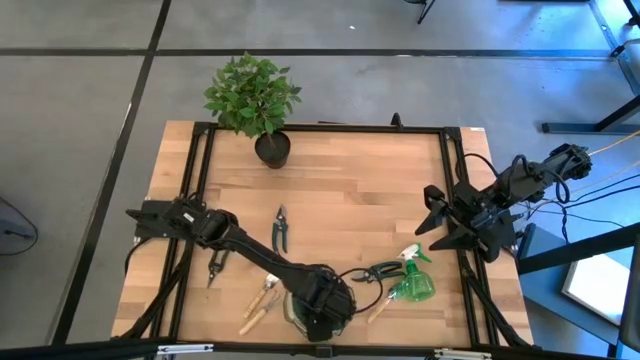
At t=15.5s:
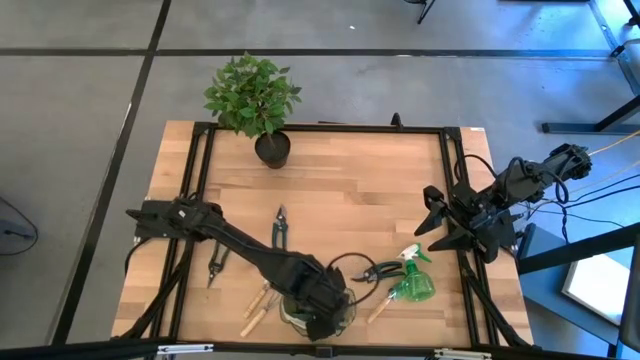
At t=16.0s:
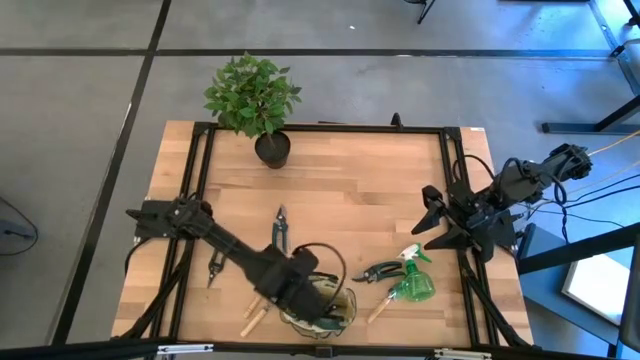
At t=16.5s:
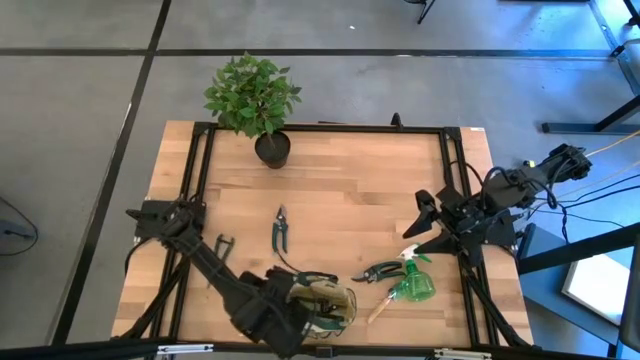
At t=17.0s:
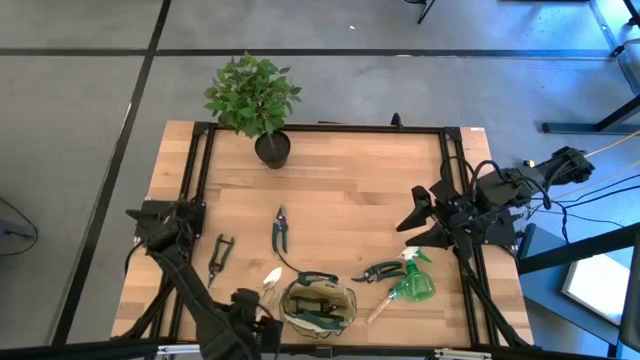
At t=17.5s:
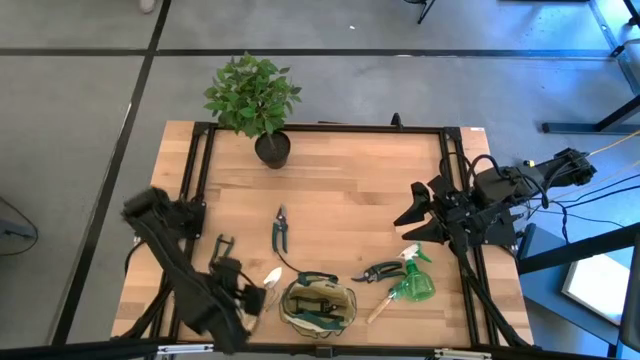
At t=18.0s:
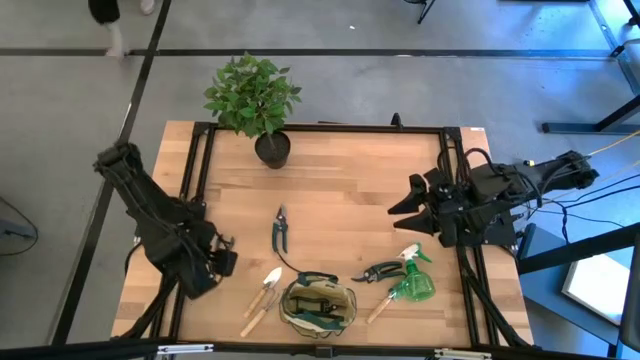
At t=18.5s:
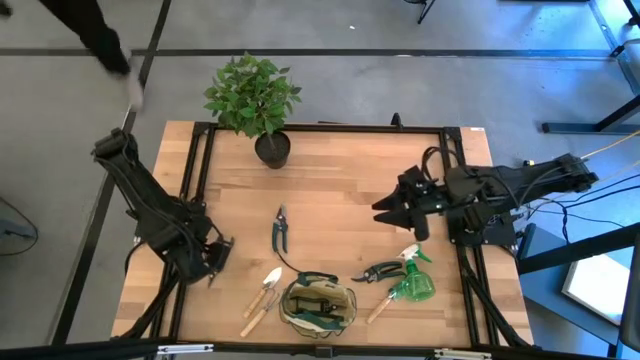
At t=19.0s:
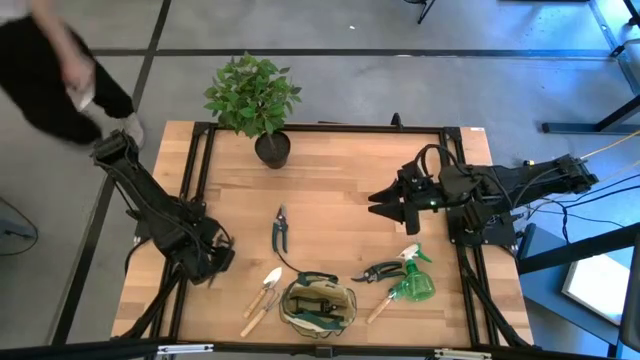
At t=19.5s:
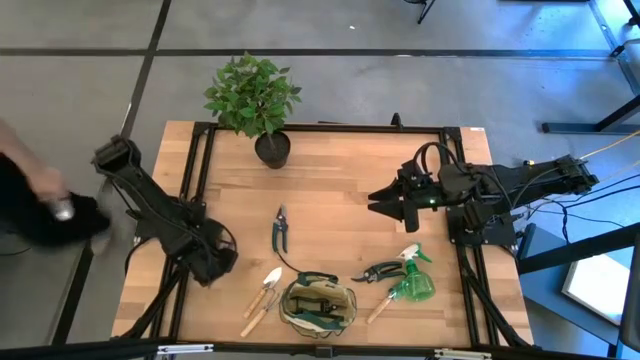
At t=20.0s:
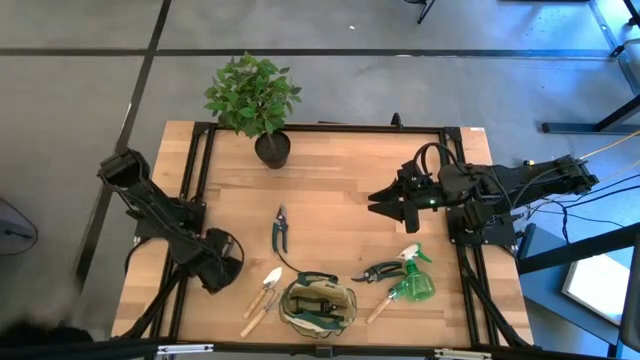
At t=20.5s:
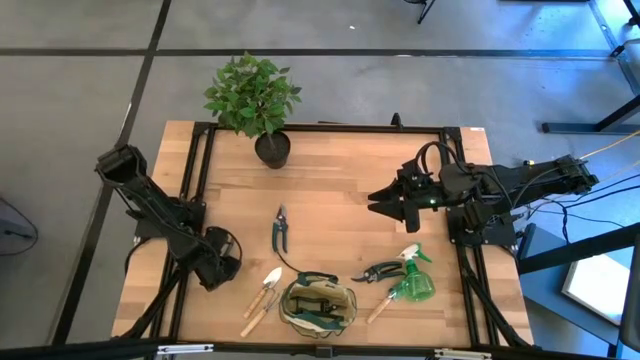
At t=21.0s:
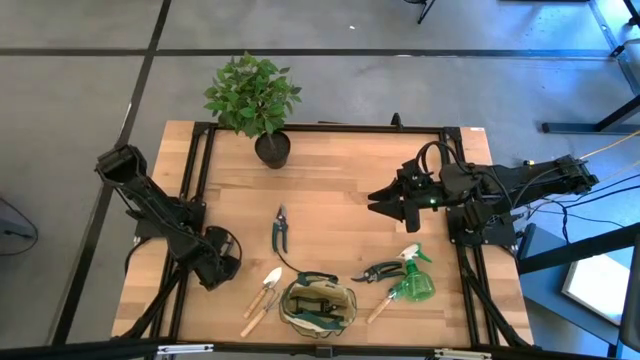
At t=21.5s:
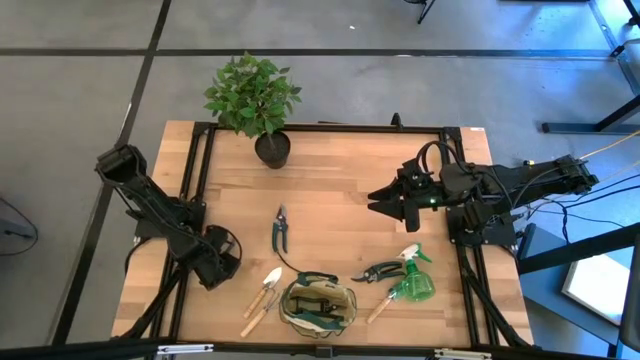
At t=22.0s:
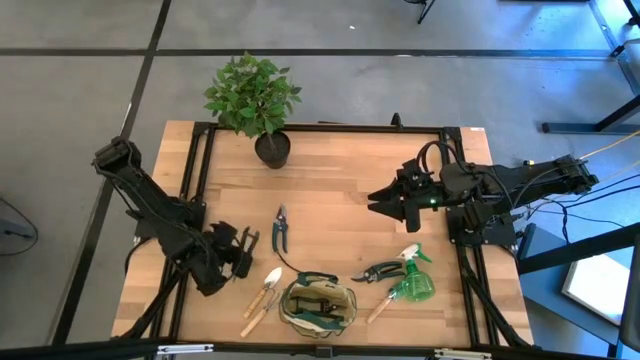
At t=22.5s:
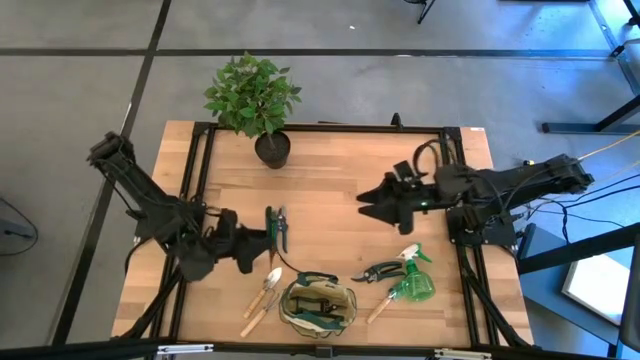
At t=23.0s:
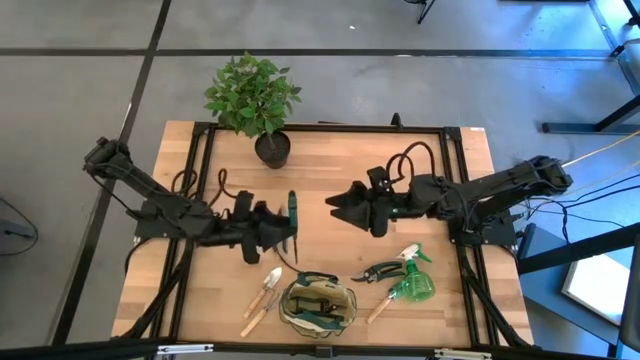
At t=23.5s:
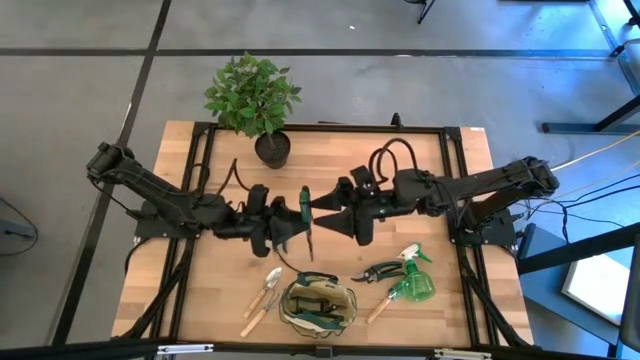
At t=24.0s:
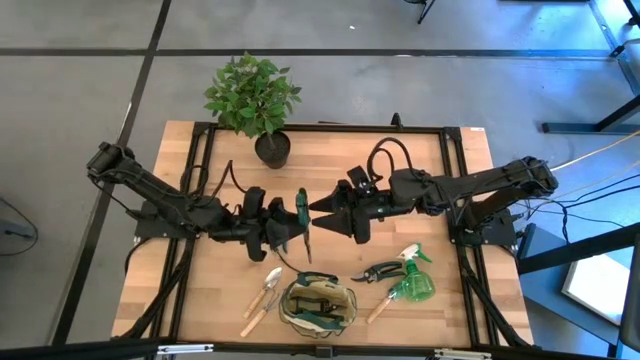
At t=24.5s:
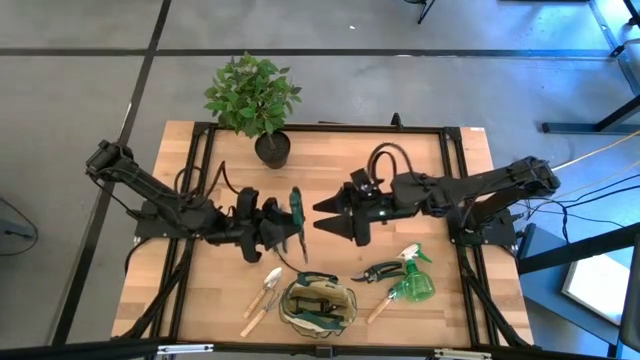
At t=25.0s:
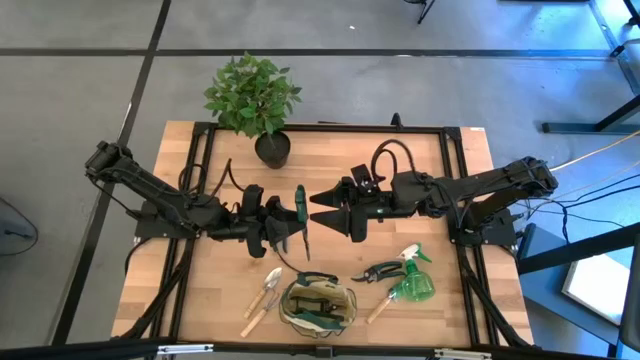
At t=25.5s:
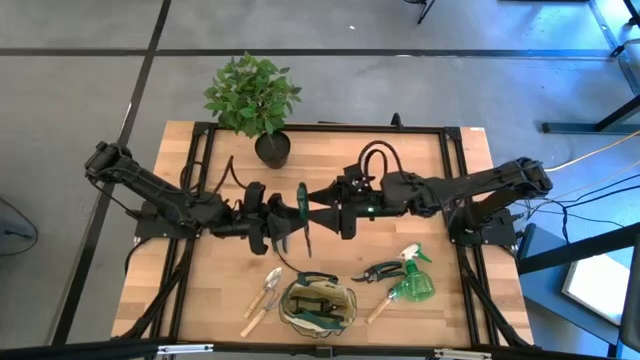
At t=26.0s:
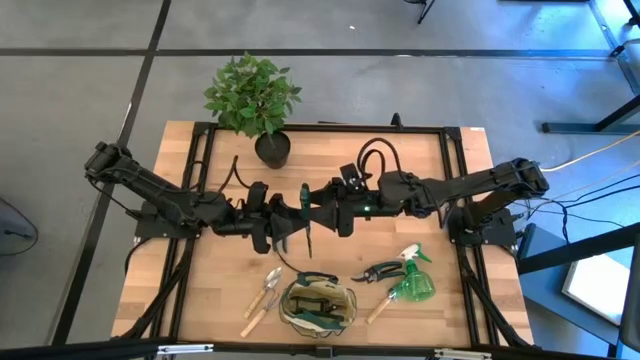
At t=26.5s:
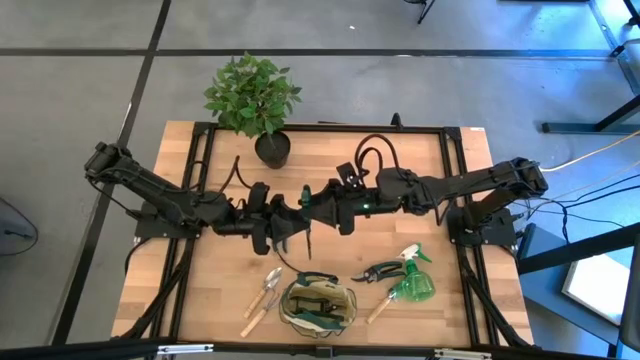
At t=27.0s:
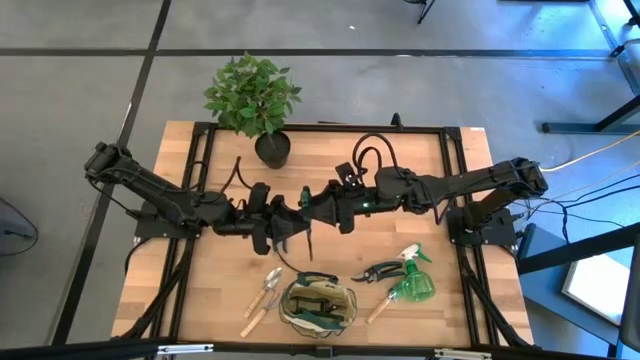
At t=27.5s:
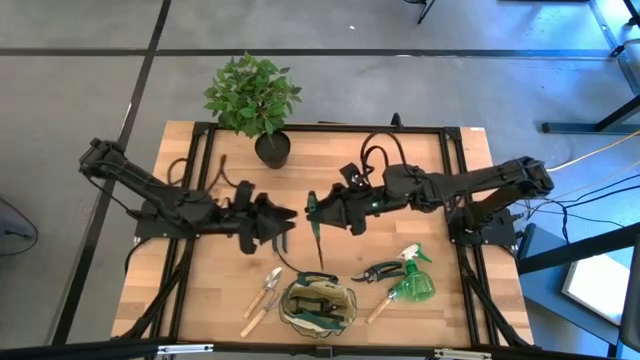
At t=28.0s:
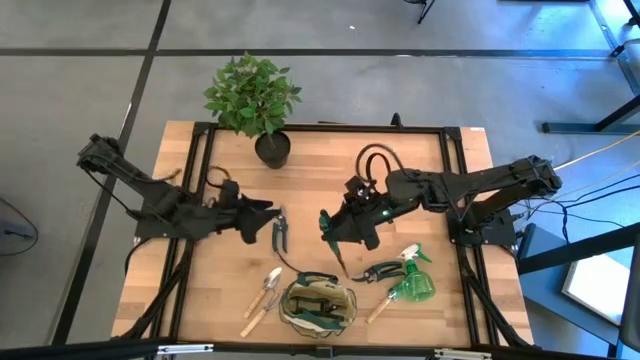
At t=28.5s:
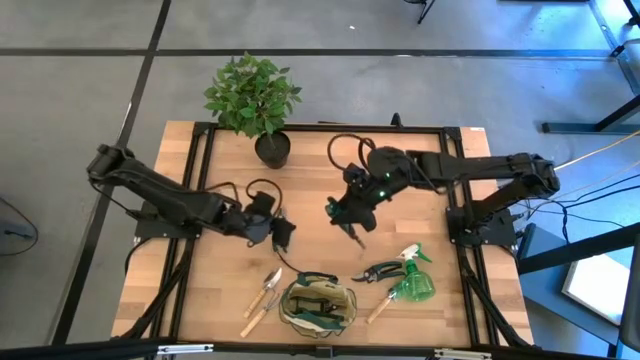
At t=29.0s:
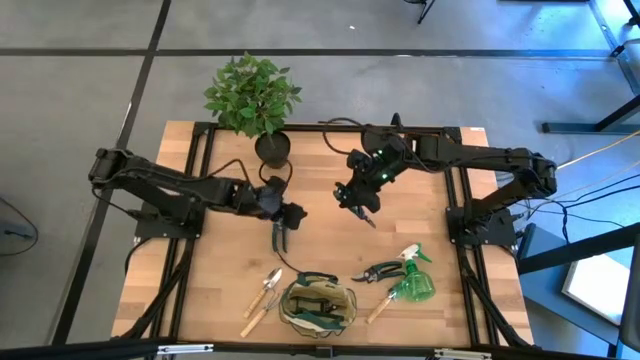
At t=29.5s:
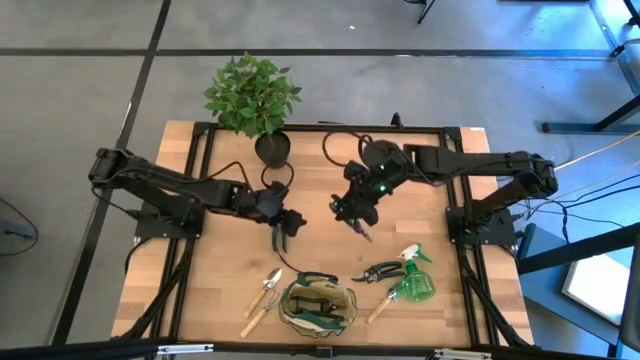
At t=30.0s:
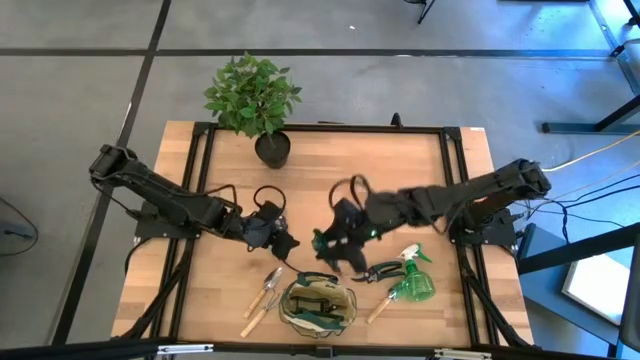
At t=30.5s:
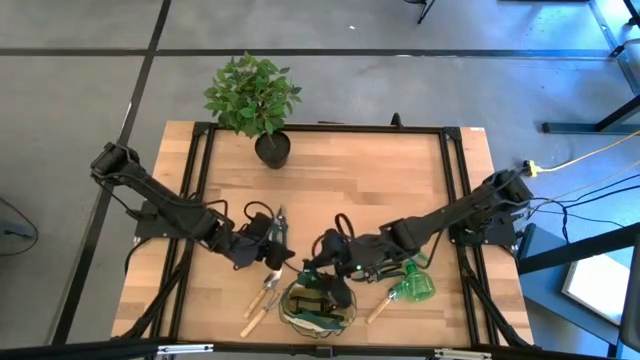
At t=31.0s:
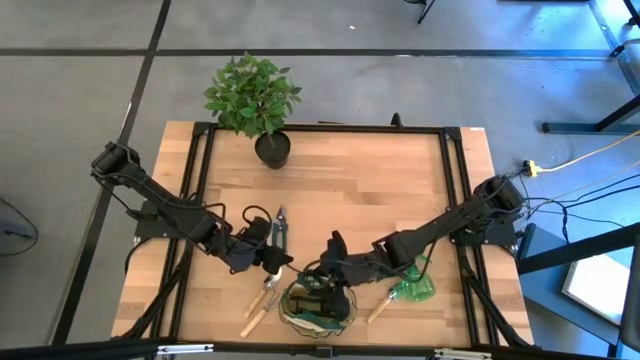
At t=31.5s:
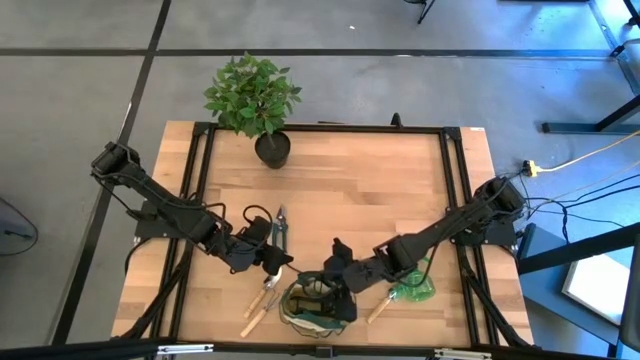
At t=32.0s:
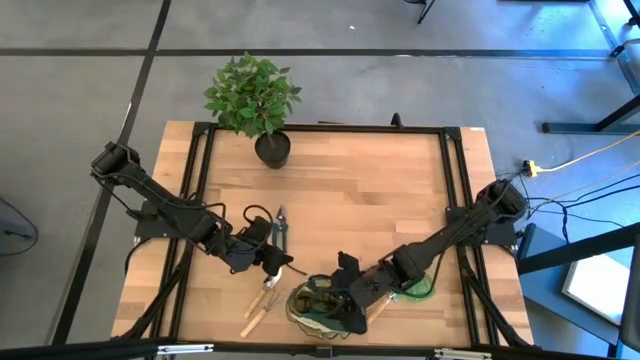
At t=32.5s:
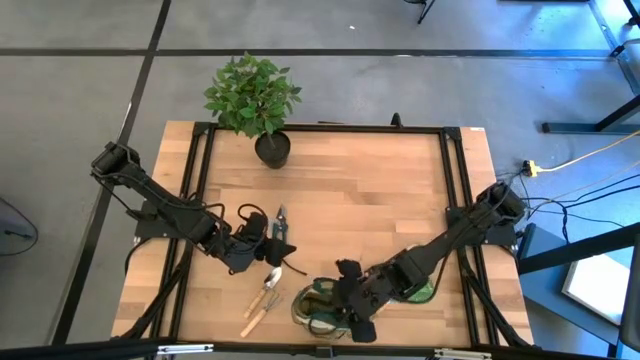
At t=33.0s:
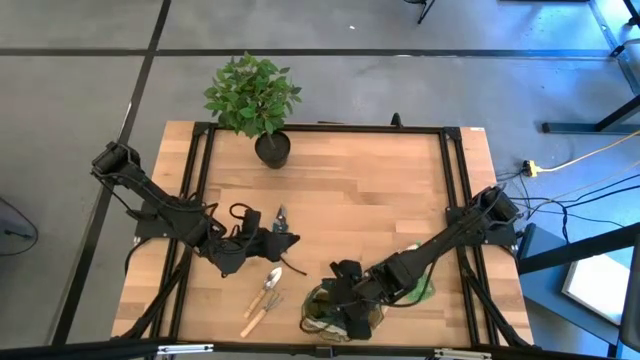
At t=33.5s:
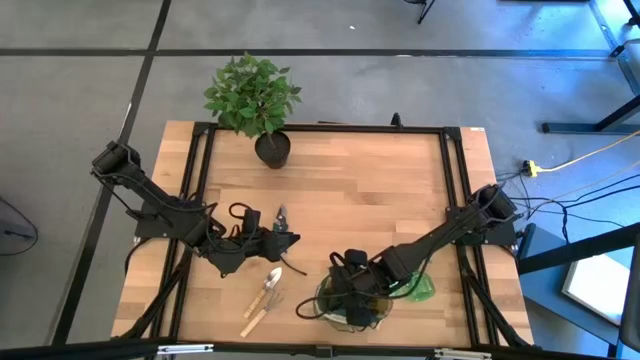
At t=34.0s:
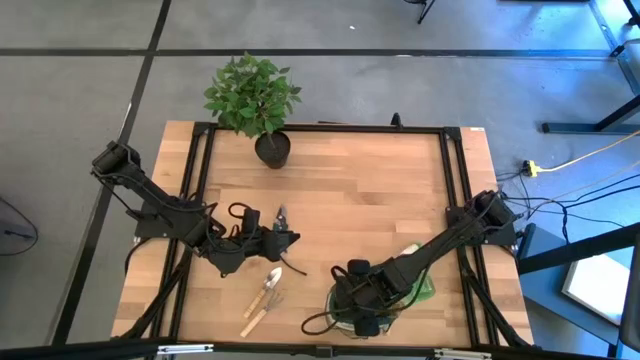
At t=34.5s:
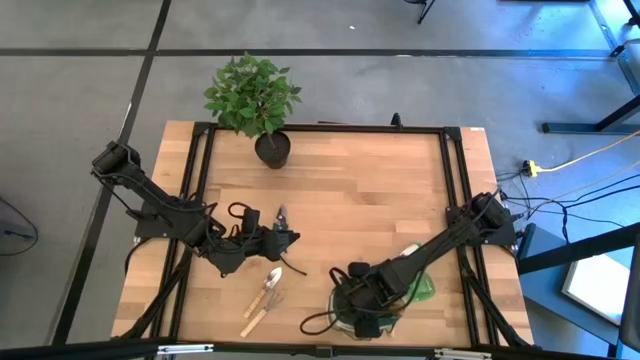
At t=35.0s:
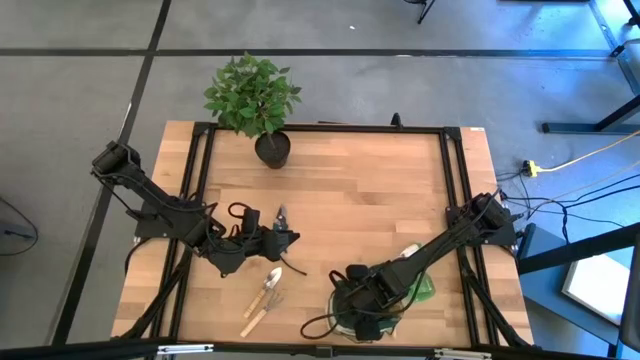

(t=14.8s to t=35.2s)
Task: Pick & Place Garden tools in Gardening bag
Put the green fruit pruner into the brown gardening bag
